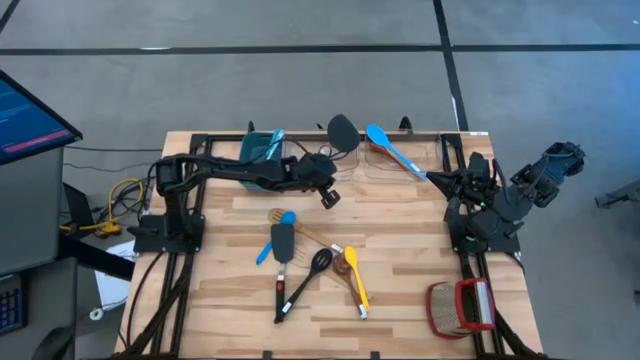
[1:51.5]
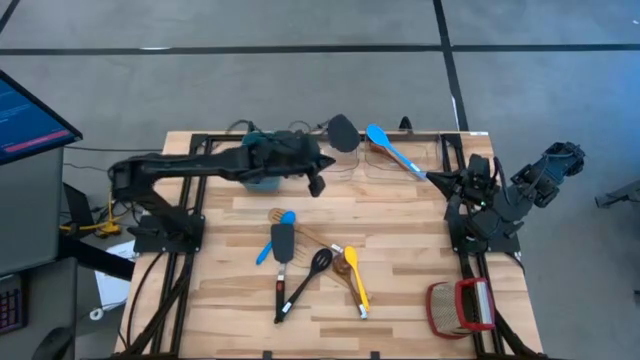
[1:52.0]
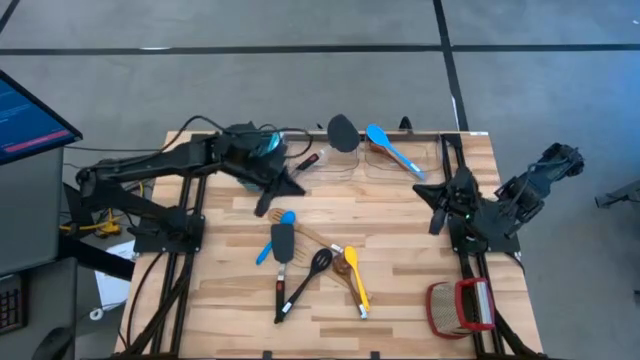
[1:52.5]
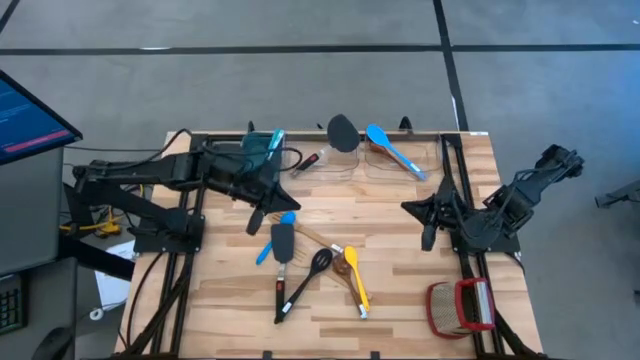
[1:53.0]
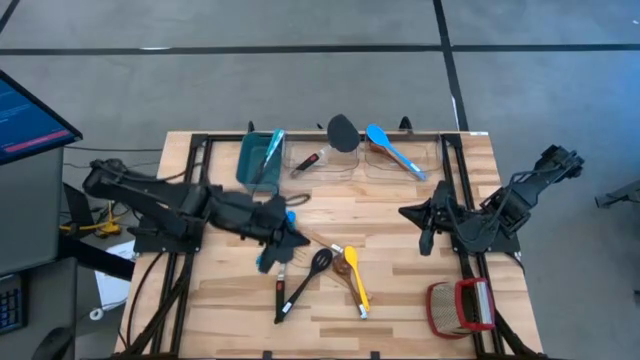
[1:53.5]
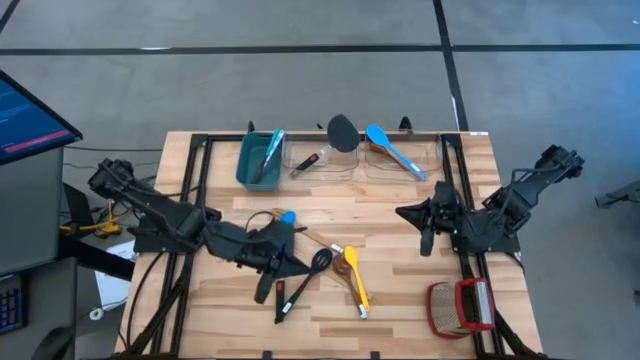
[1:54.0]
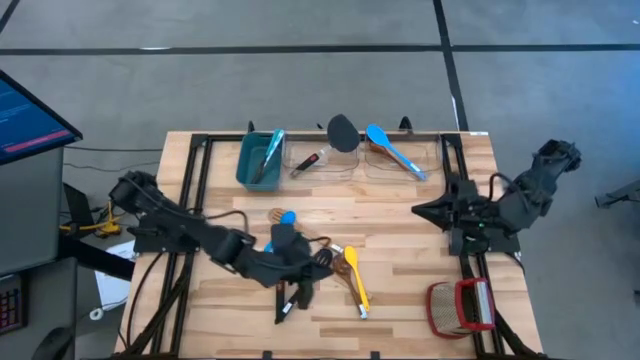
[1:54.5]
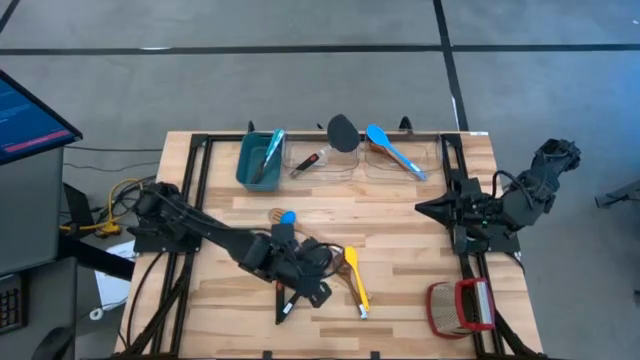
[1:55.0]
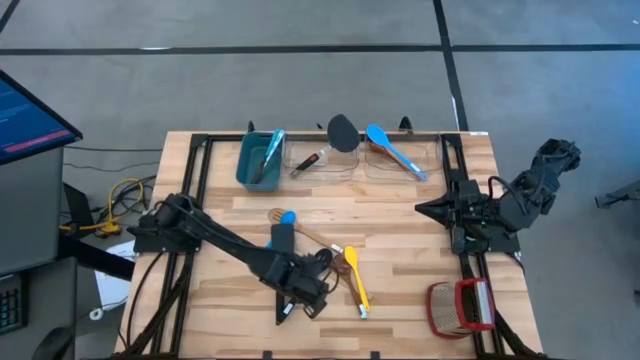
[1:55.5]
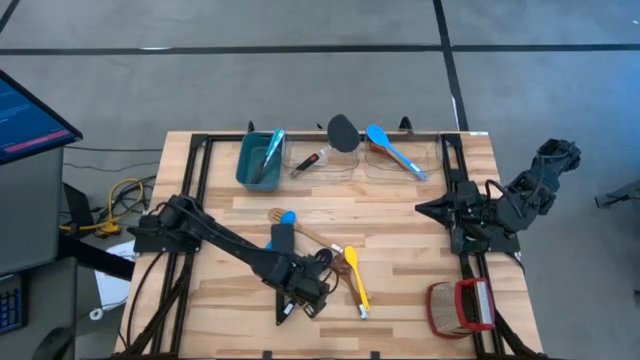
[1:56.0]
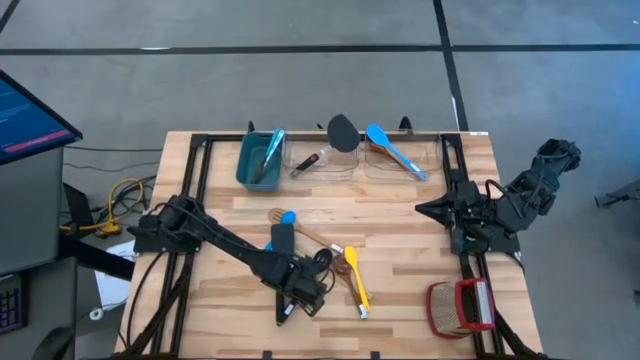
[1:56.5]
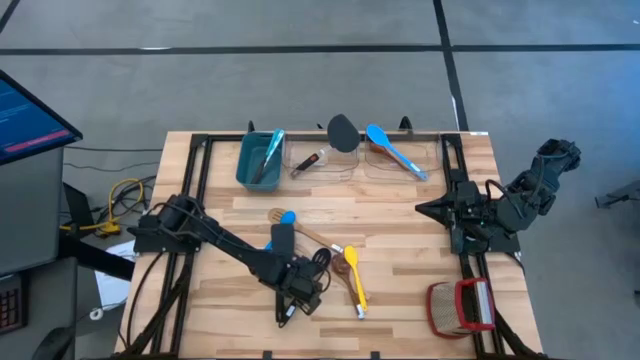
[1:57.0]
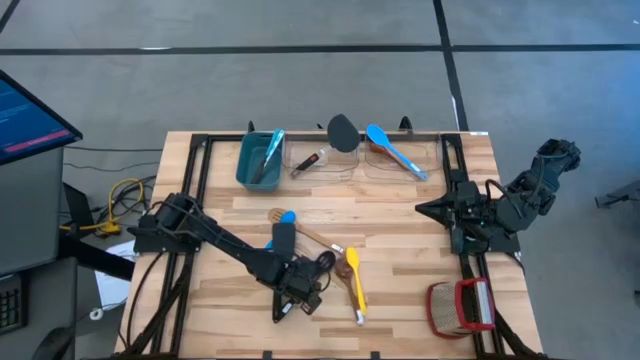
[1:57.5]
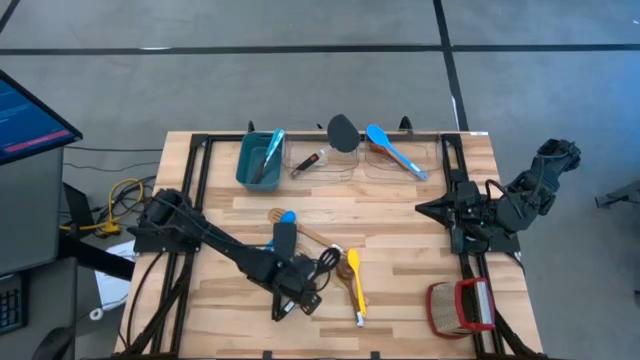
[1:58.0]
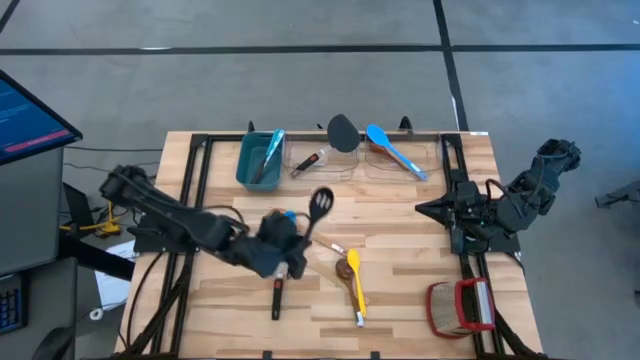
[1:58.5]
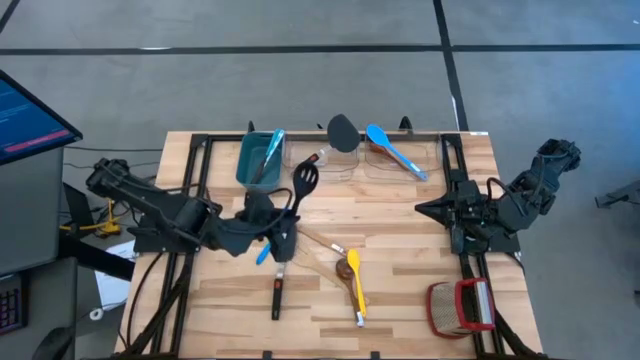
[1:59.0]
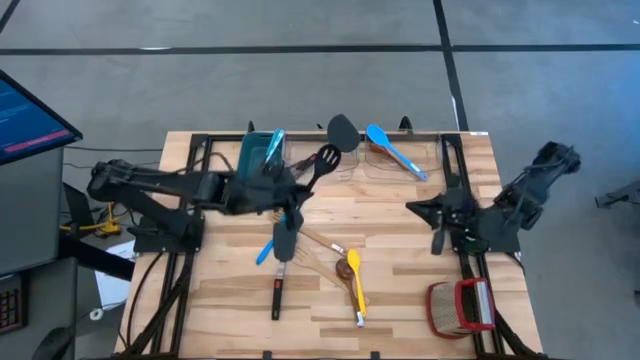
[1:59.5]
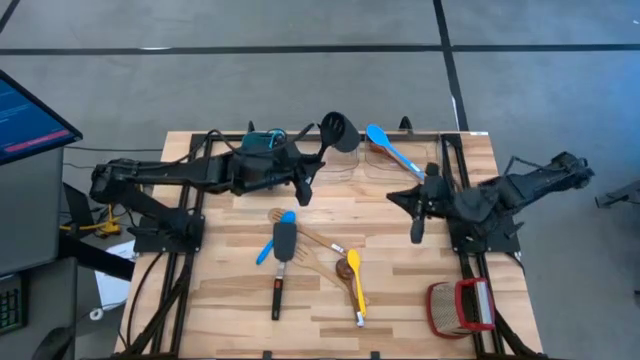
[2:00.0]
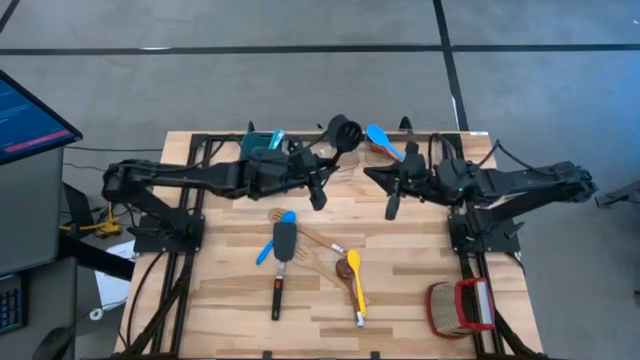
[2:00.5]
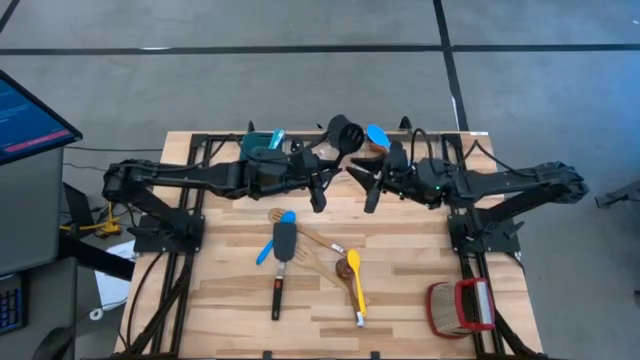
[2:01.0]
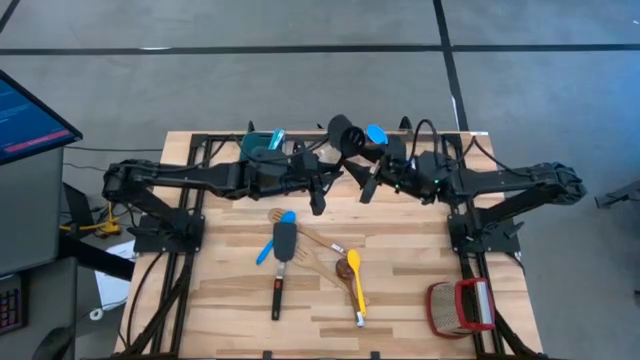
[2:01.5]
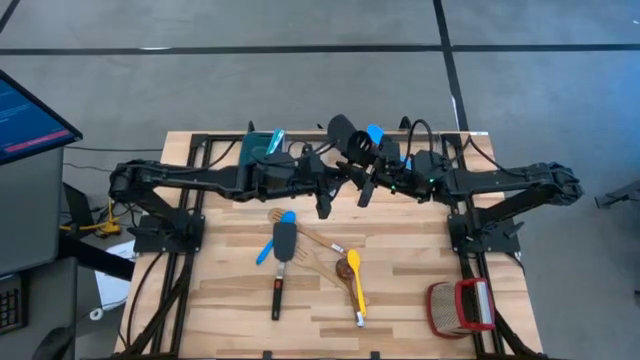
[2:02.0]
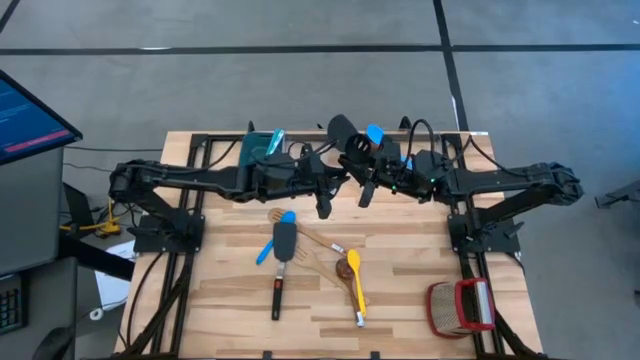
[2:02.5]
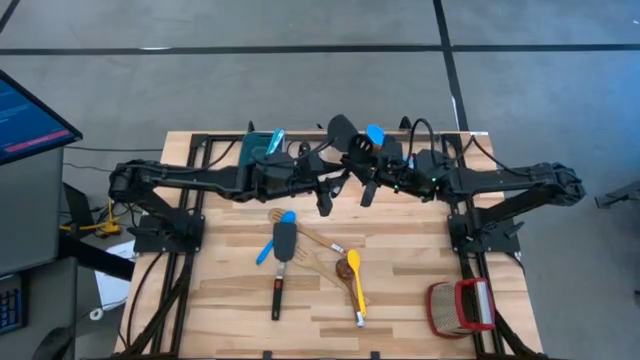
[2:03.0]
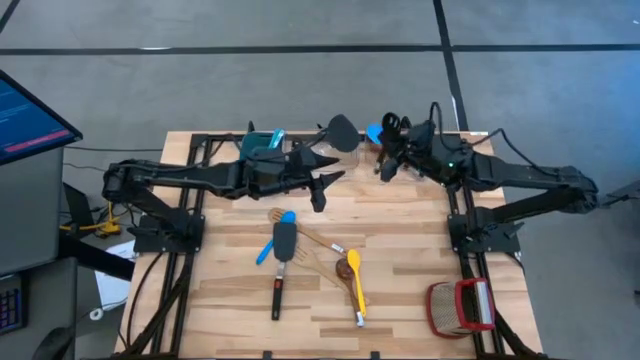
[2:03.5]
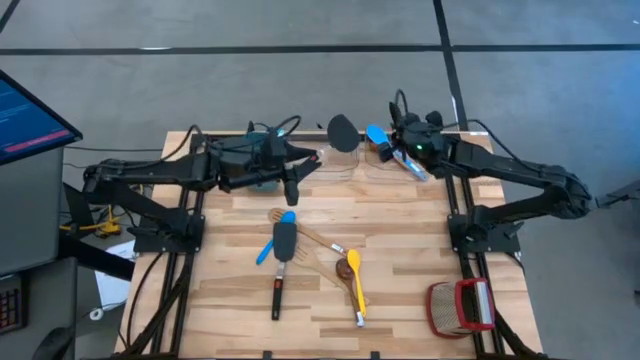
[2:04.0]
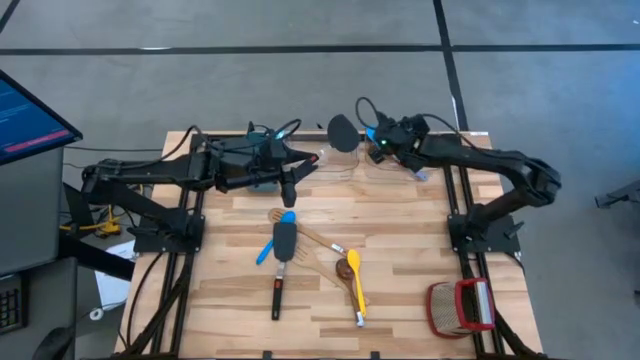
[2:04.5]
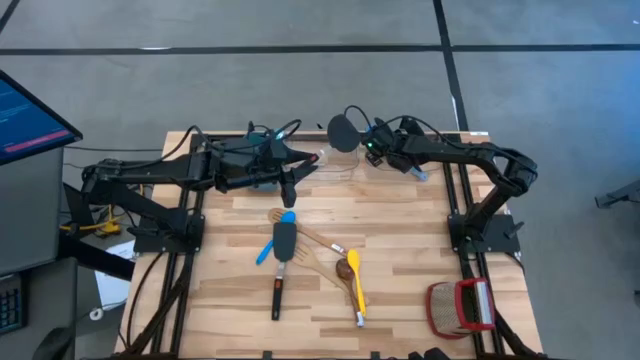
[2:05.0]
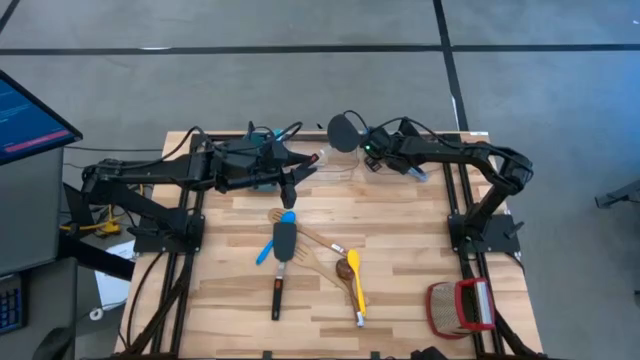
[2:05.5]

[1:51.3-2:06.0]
Task: Pick & Place Kitchen Items
Put the black slotted serving spoon into the right transparent bin

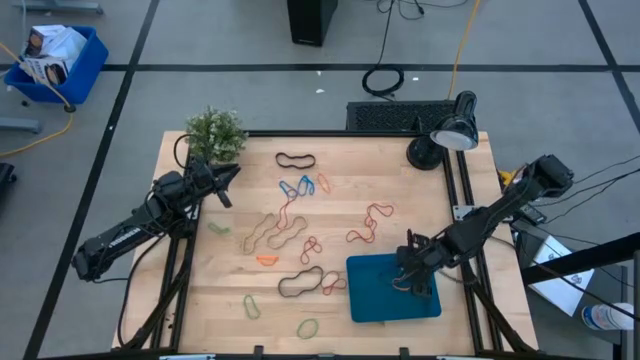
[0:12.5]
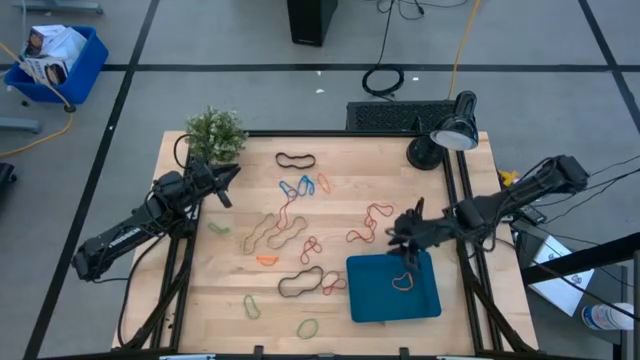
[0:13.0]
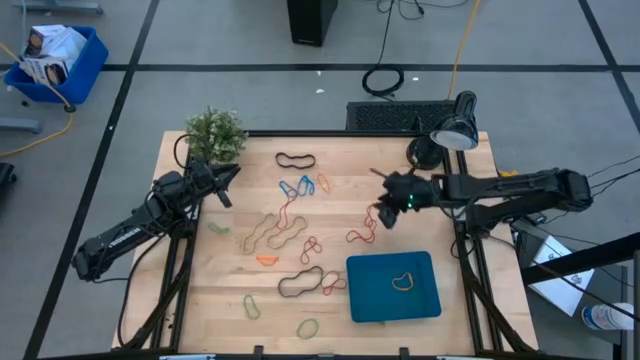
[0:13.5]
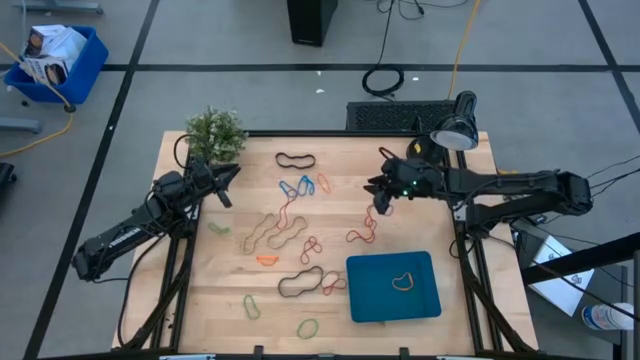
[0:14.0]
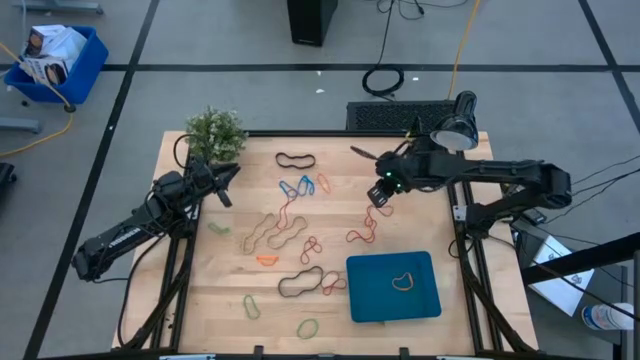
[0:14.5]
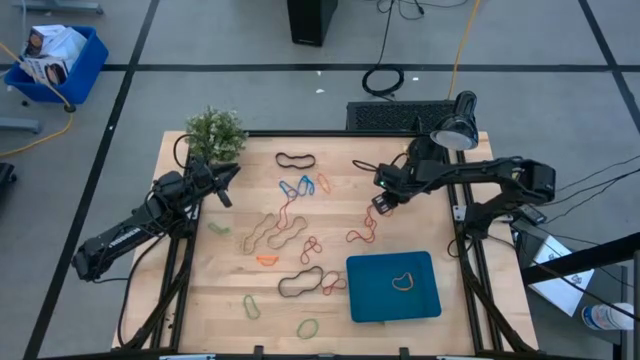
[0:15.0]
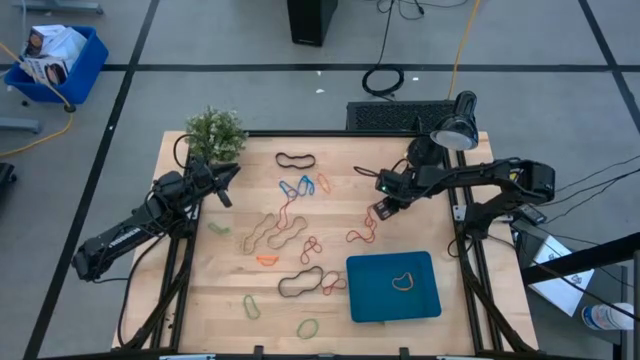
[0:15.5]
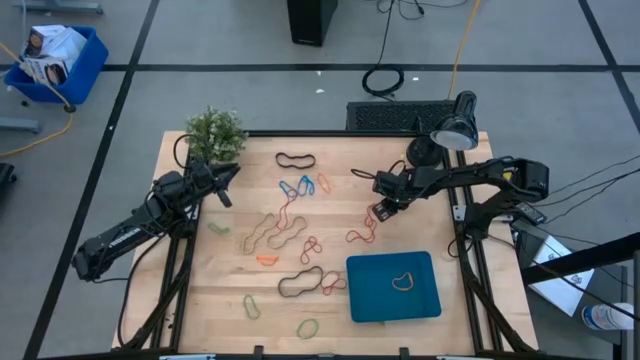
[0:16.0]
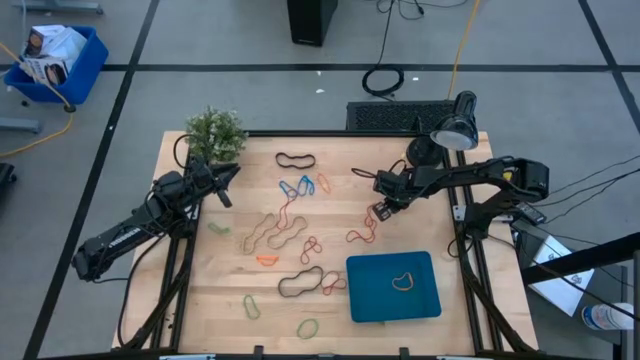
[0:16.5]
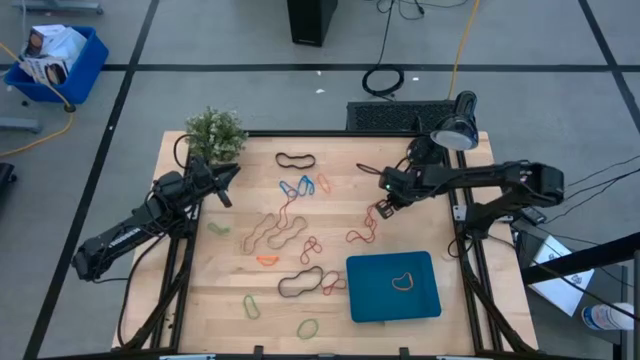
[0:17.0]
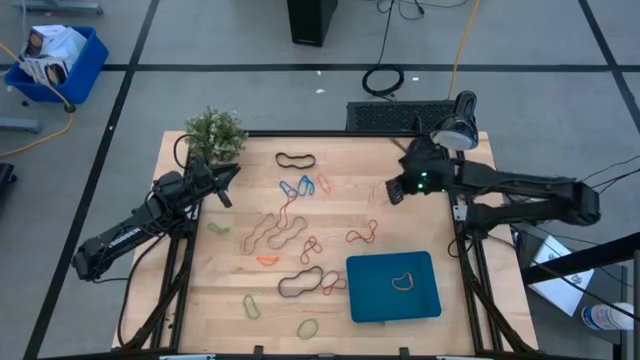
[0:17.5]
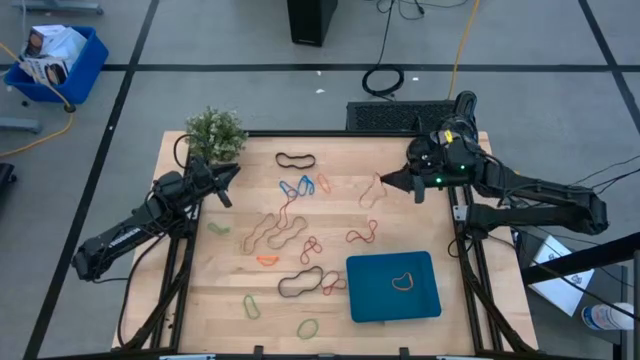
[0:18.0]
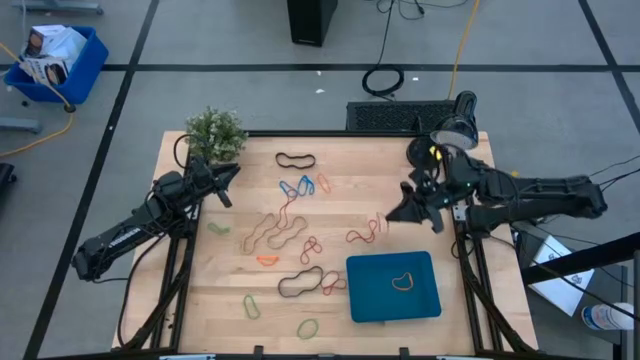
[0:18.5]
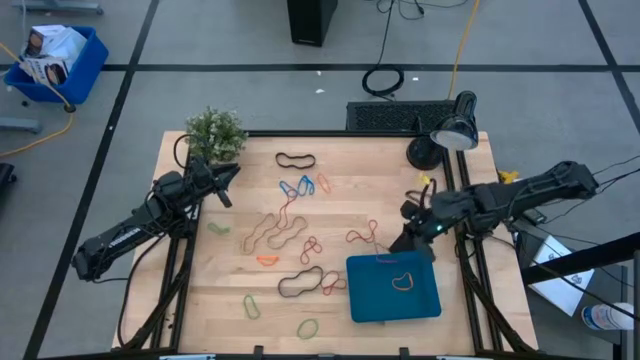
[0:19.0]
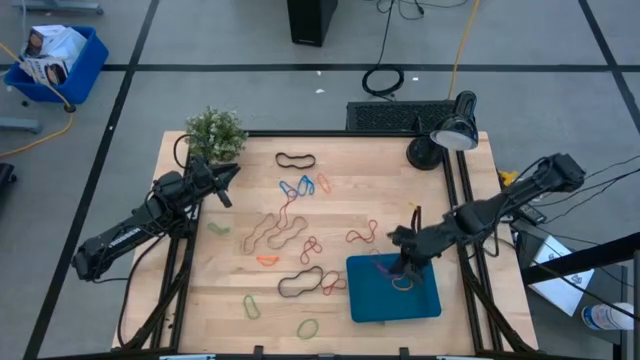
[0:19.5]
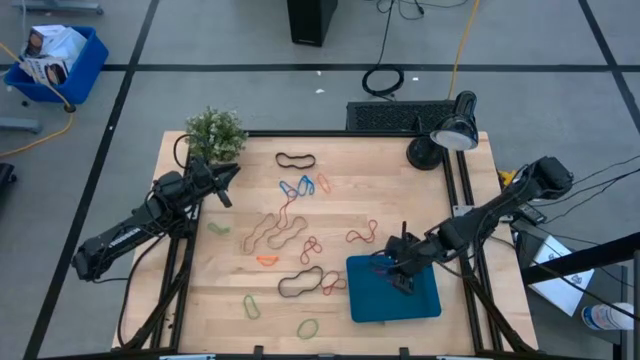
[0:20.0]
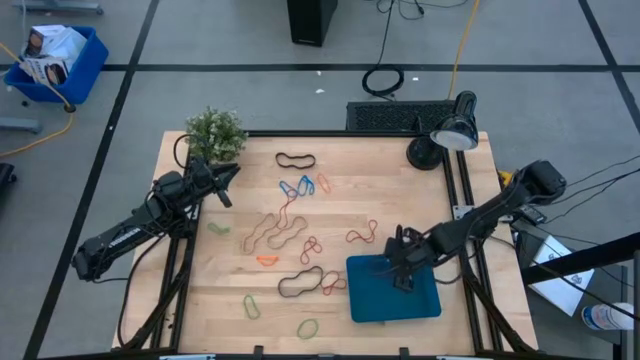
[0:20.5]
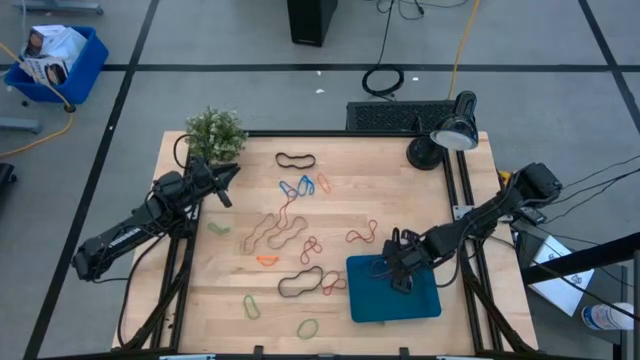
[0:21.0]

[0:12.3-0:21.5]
Task: Pick and place rubber bands into bin
Put the red rubber band into the blue bin
